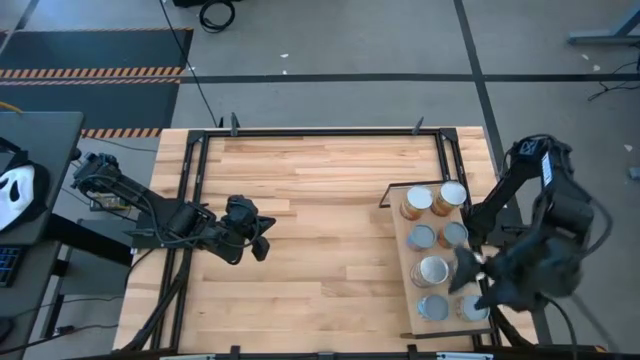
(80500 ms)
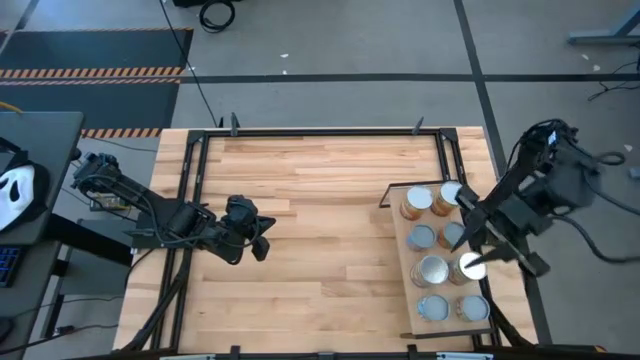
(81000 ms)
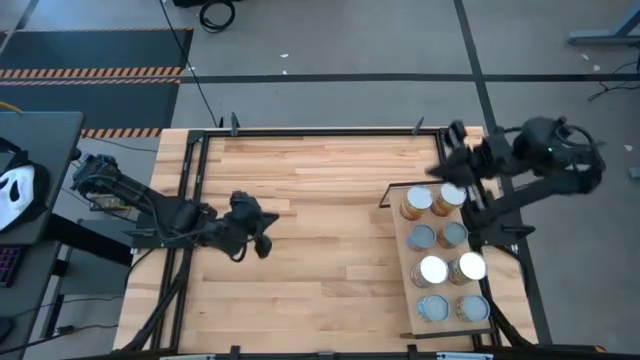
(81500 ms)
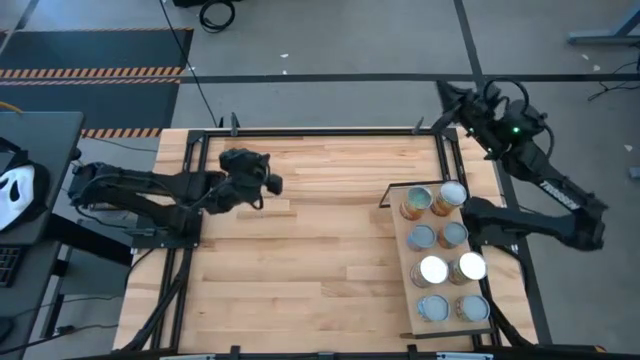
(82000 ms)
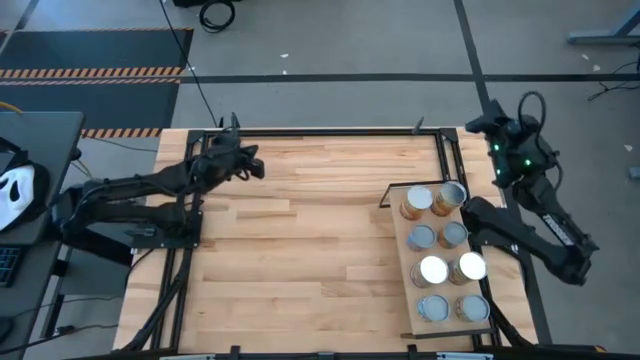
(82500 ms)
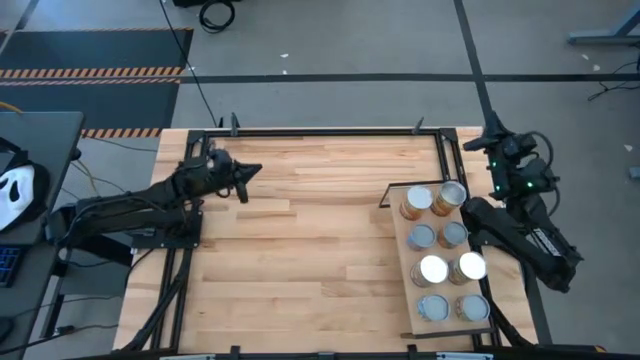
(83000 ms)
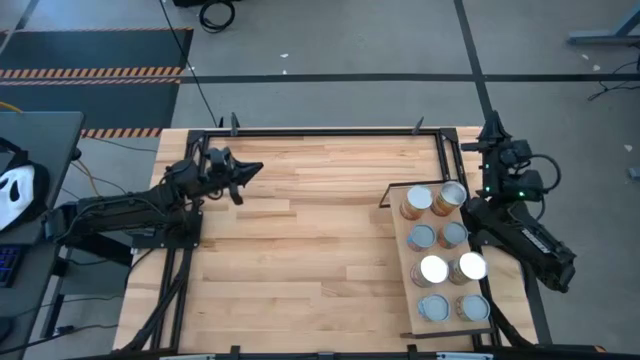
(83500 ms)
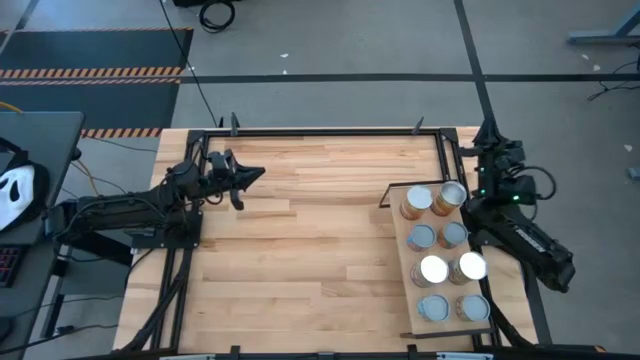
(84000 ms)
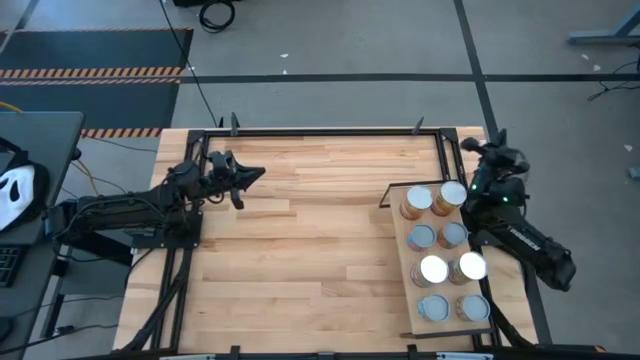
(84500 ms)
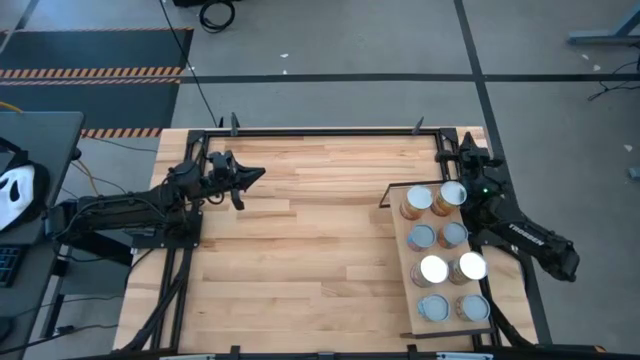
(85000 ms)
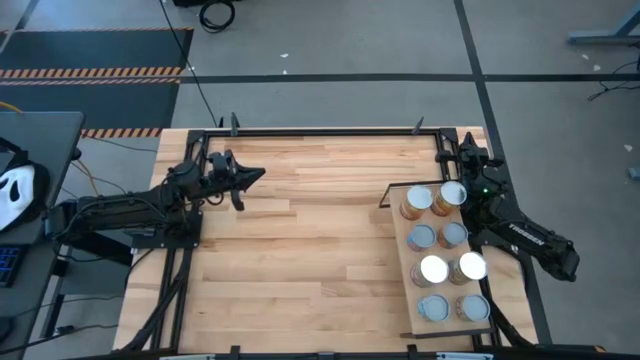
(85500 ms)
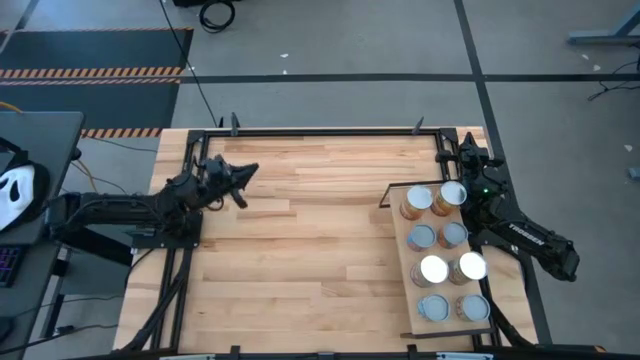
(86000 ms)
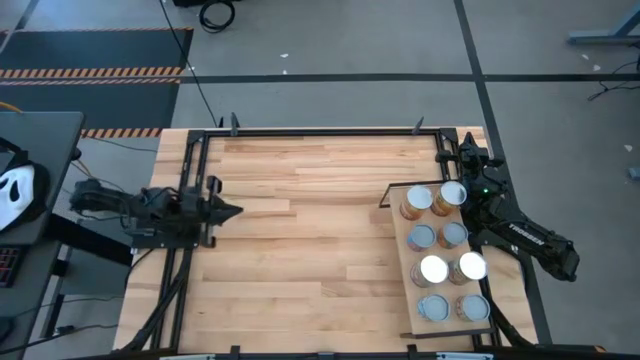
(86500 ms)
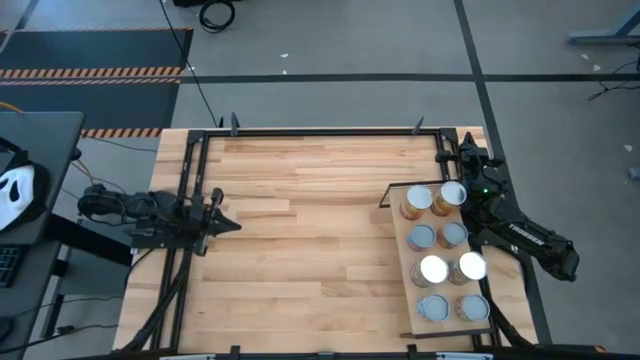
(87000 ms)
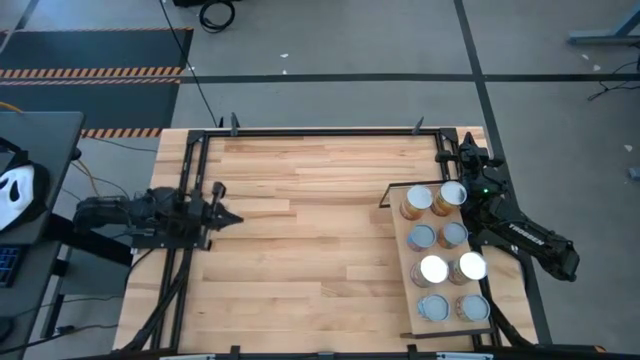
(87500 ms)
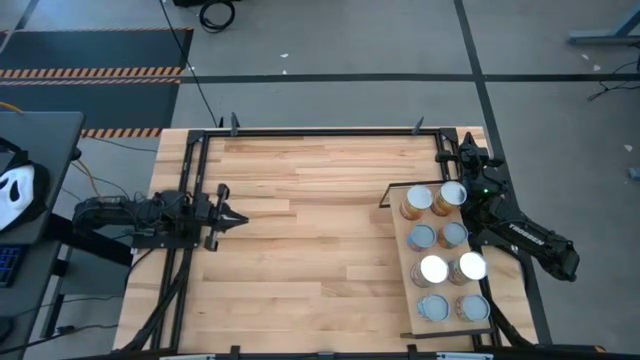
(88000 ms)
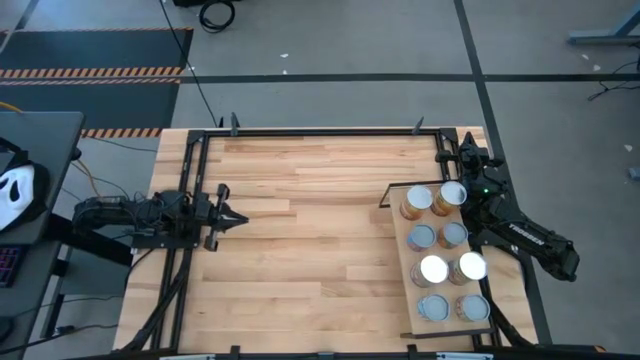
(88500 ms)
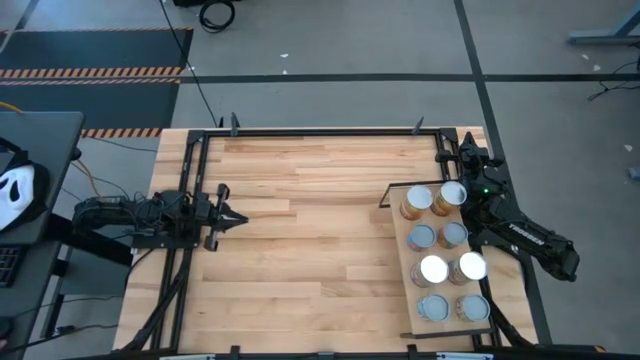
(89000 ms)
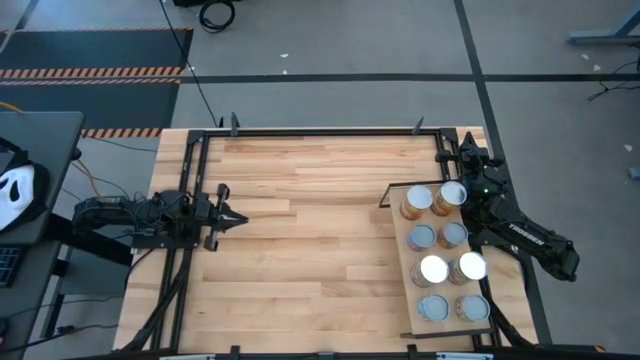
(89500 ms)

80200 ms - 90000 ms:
Task: Pick and place cans onto a shelf
Return to Home Position

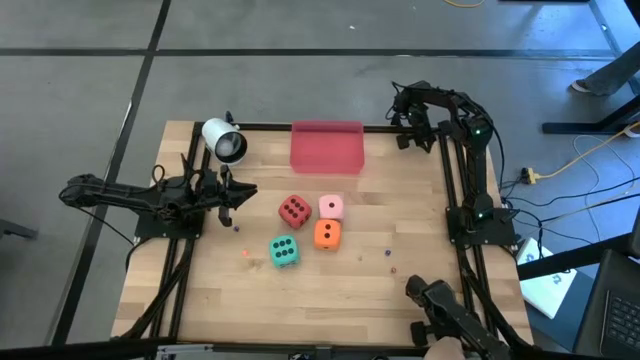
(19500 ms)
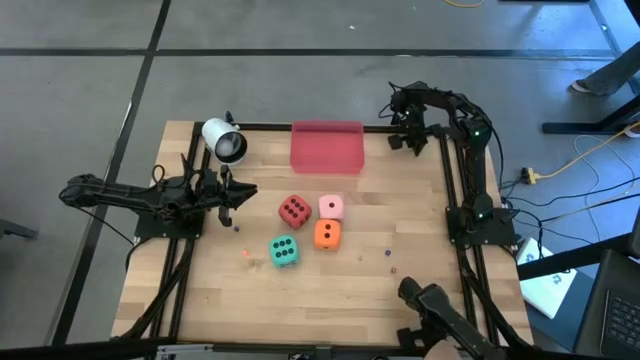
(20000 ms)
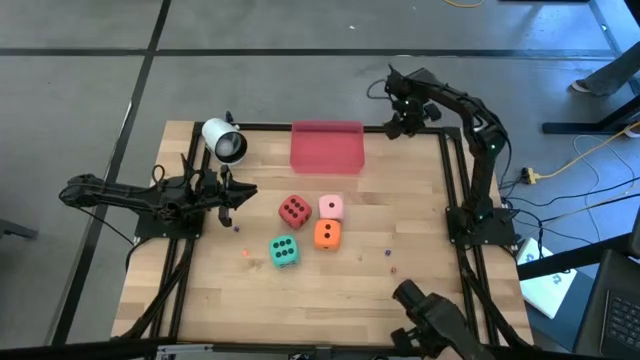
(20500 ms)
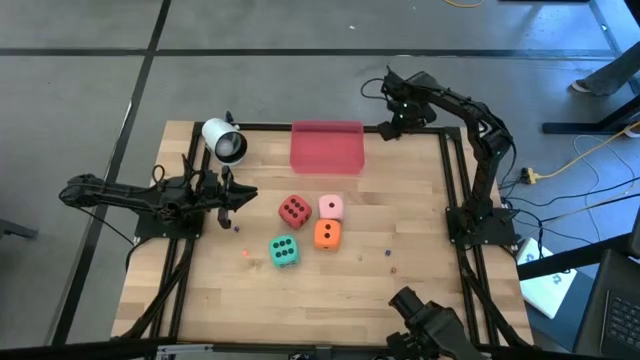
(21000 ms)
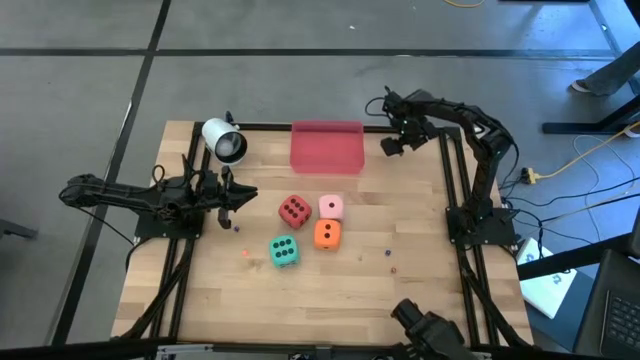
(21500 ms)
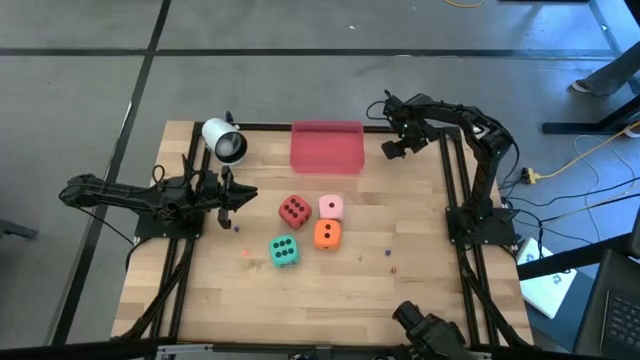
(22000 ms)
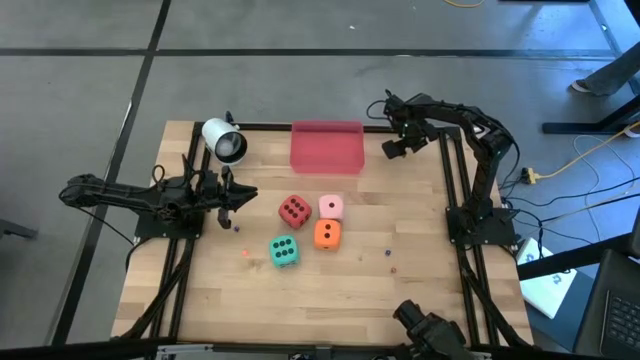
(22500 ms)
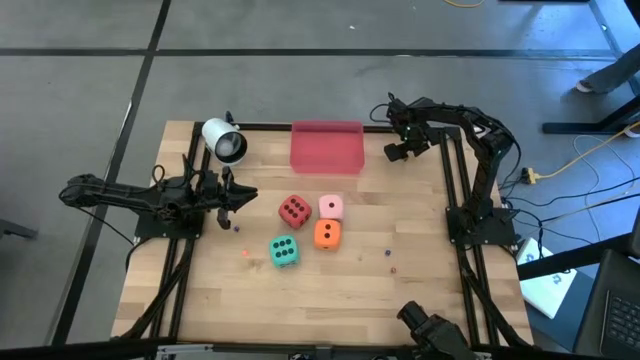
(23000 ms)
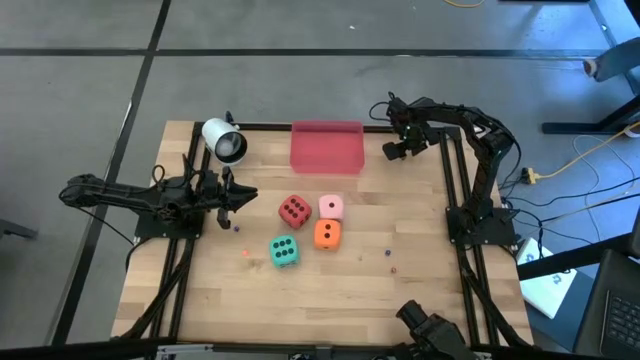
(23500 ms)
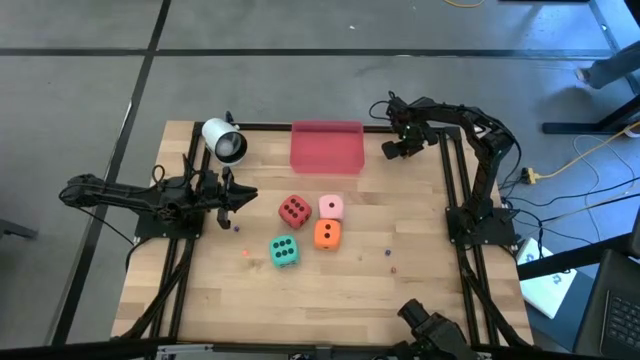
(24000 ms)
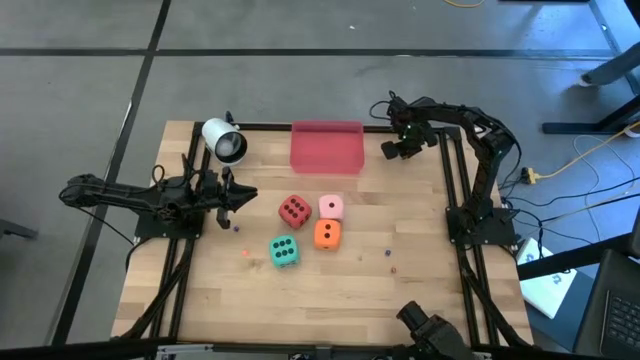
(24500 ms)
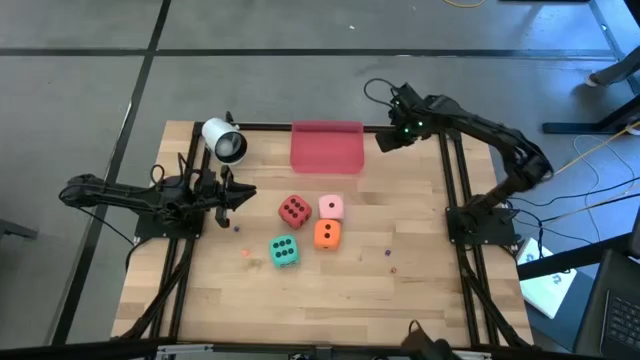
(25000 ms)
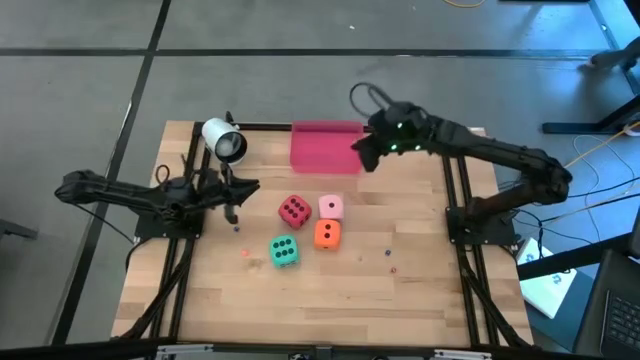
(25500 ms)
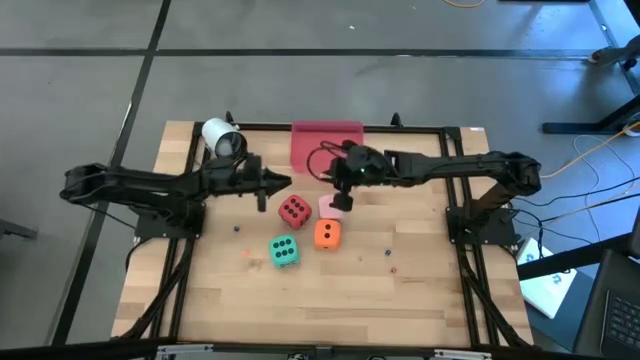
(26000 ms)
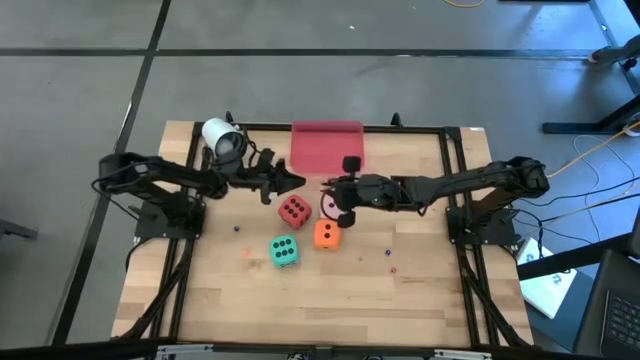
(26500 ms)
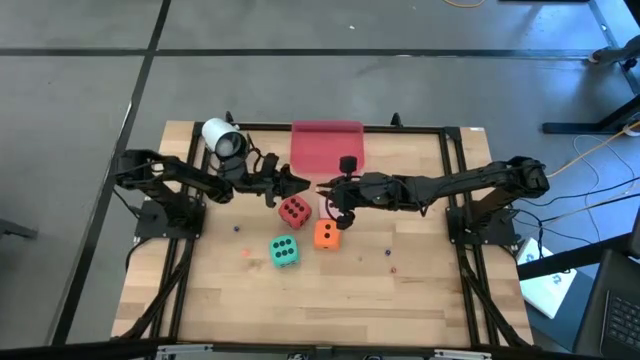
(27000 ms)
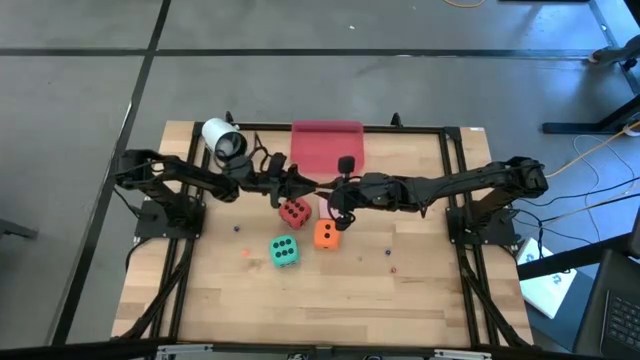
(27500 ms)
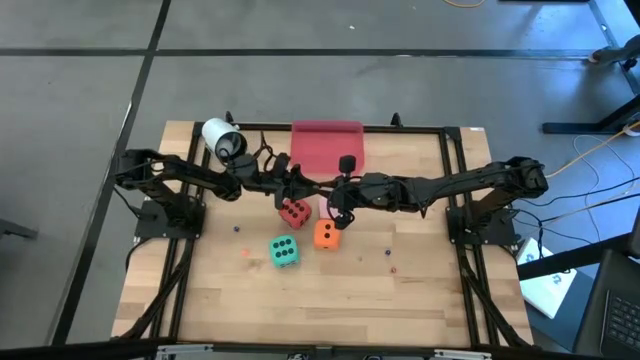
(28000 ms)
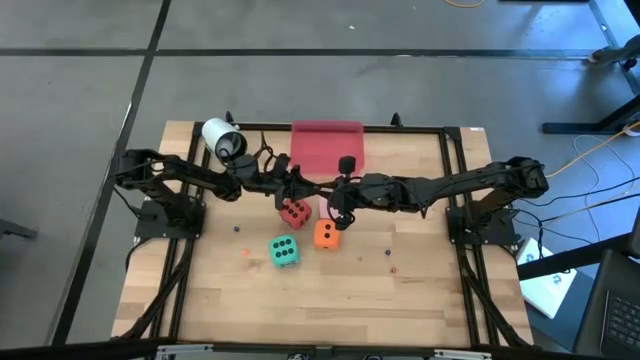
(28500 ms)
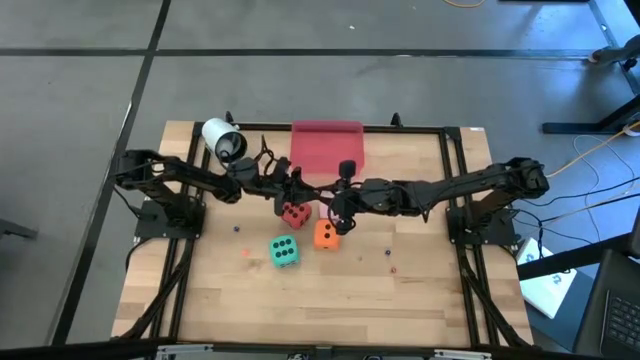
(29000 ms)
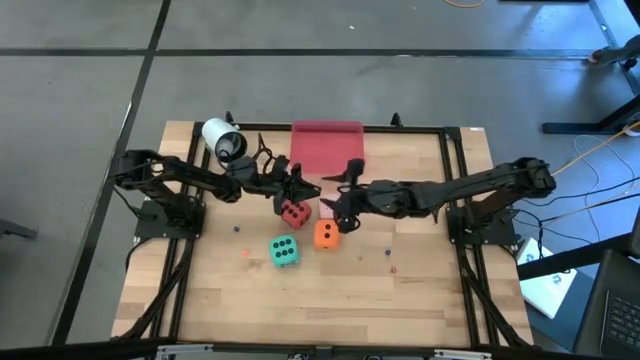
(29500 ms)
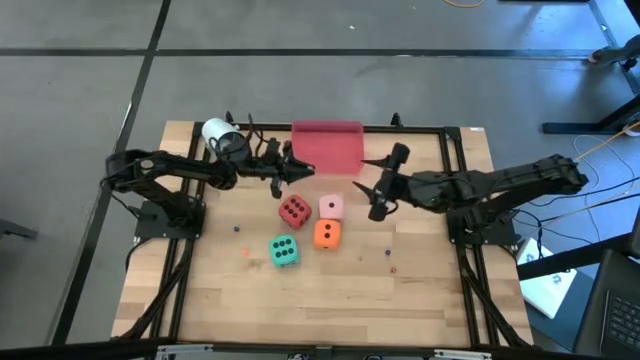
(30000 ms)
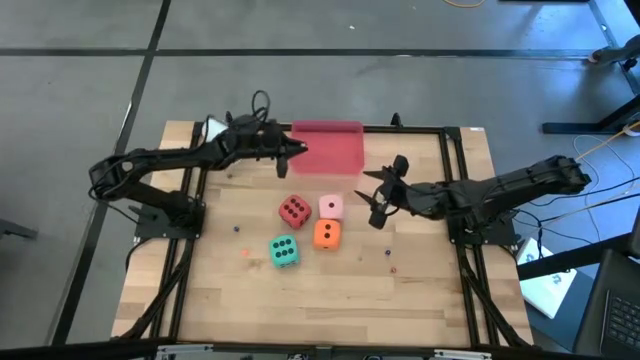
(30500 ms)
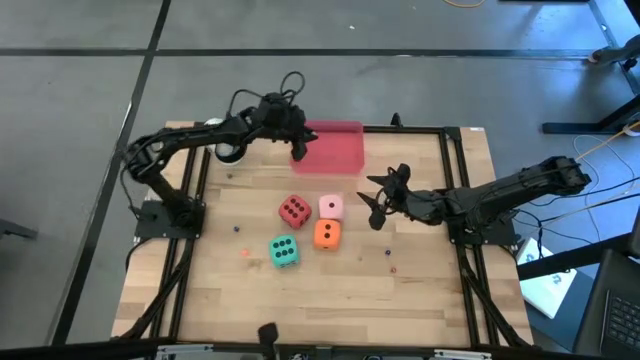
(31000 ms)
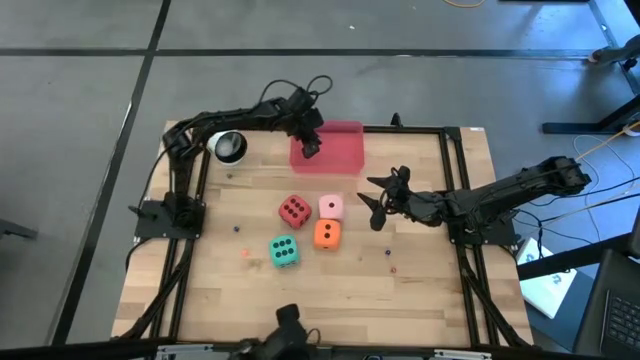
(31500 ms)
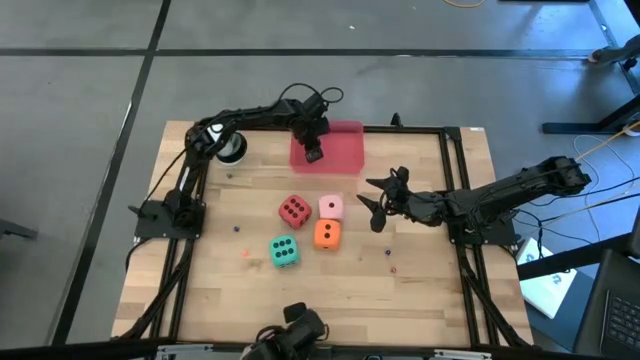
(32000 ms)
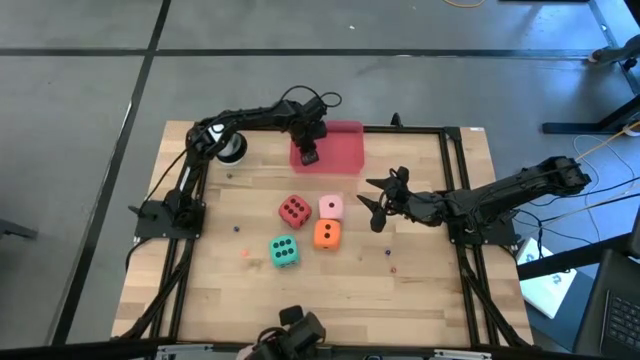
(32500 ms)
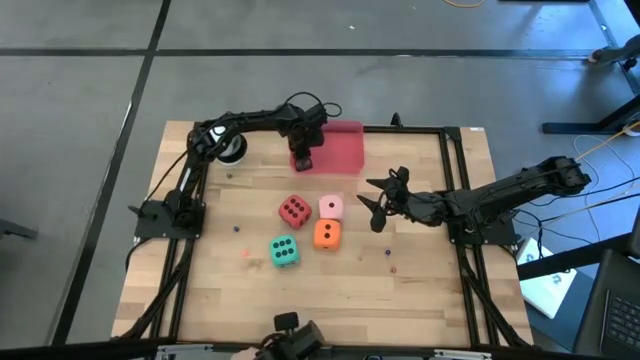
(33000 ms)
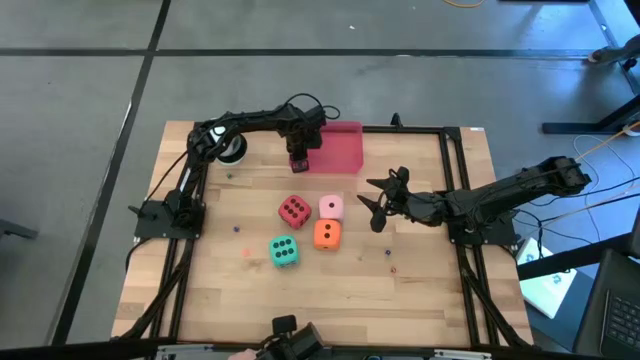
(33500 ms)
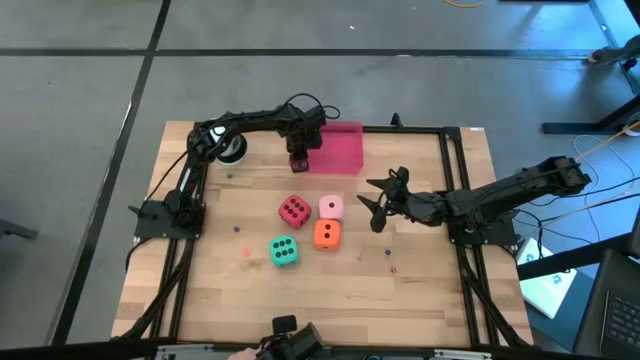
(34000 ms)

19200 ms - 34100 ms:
Task: Pick & Place Dice
Put the yellow die into the pink bin
